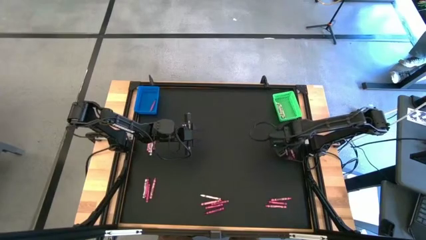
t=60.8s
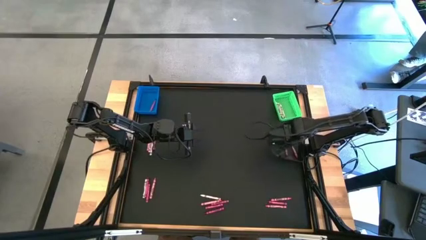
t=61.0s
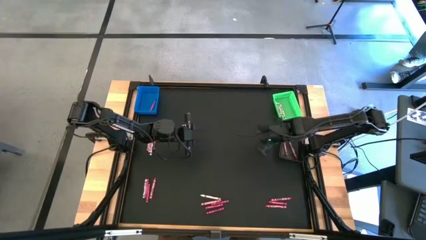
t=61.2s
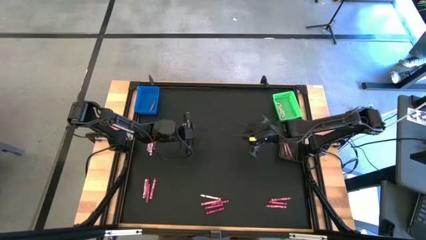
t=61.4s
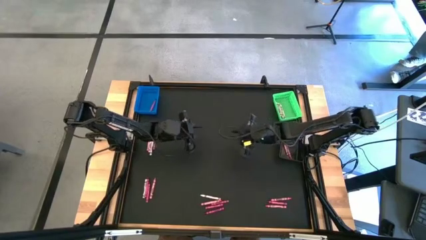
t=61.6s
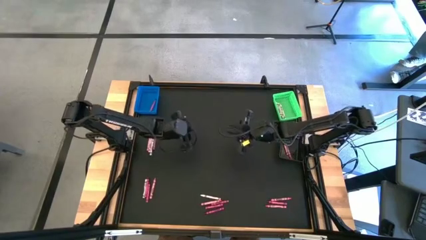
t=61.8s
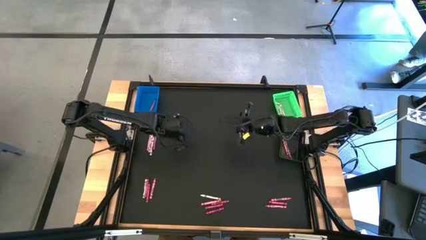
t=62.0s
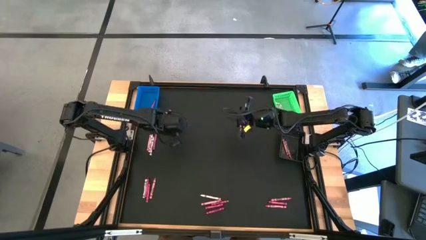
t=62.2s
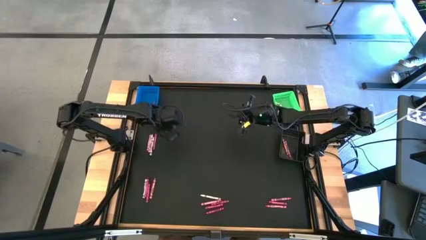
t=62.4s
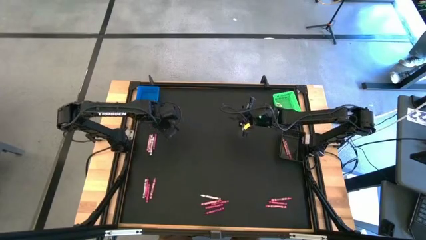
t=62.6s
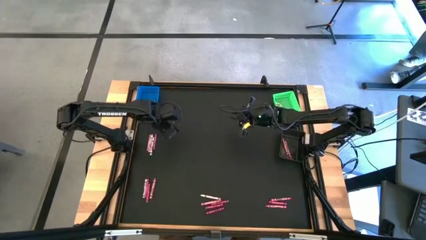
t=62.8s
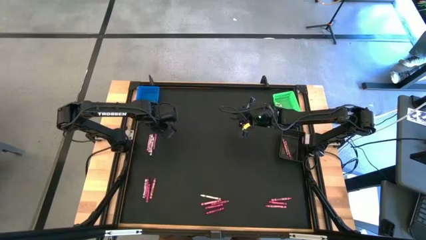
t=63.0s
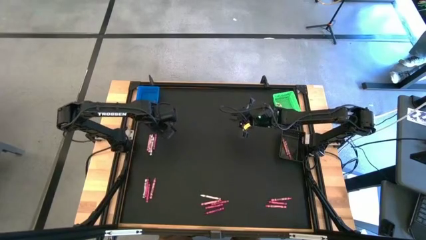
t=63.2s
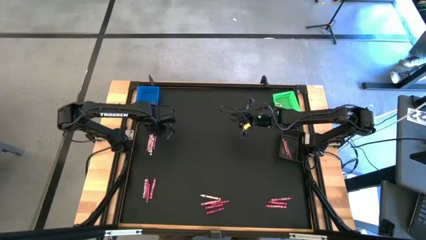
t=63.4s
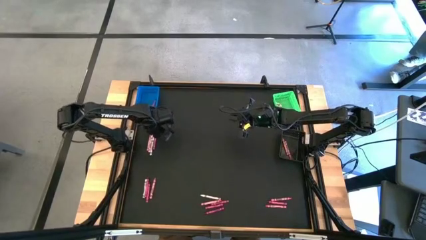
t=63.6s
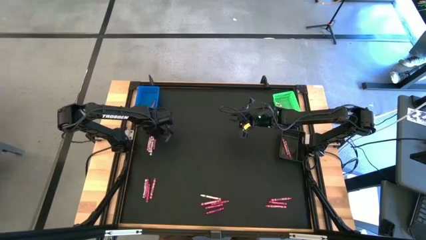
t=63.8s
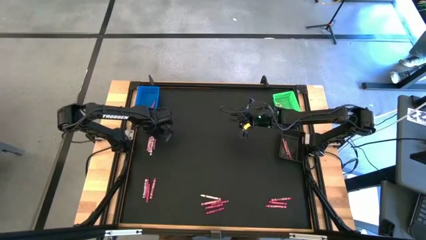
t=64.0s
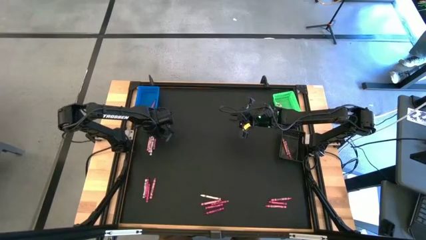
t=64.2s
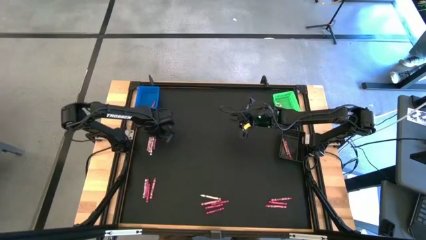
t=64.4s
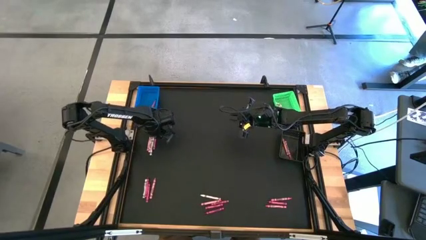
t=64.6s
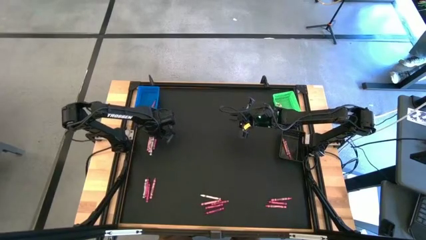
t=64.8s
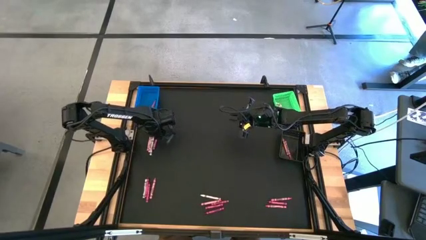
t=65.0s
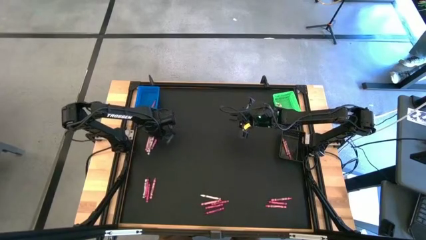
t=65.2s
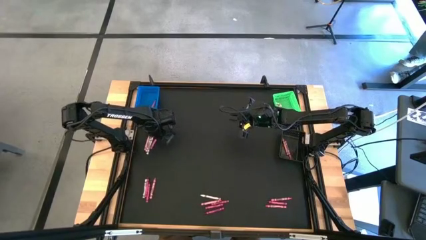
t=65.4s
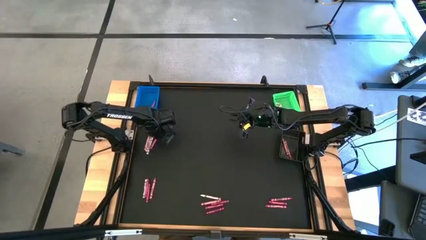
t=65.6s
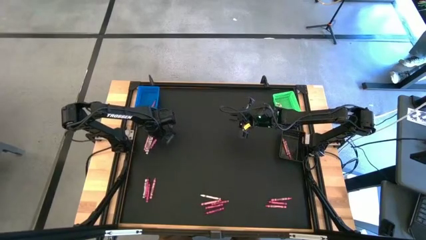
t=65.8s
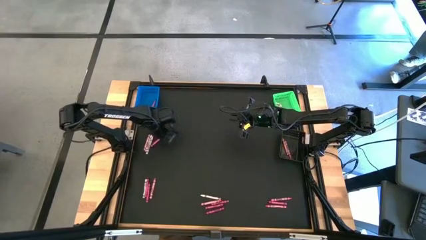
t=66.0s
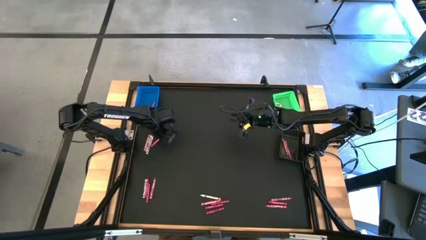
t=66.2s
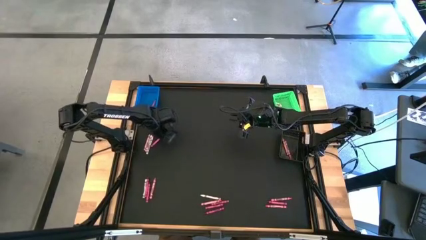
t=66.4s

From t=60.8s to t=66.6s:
Task: Sort crayons
Put the red crayon into the blue bin

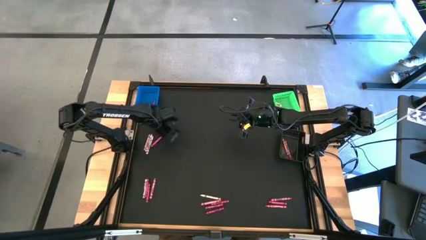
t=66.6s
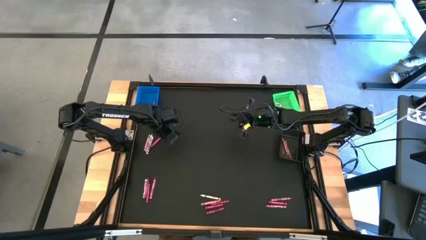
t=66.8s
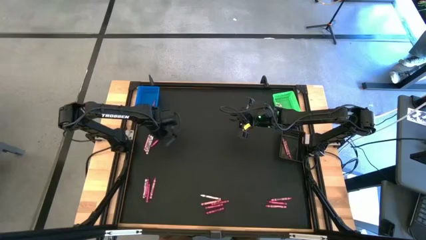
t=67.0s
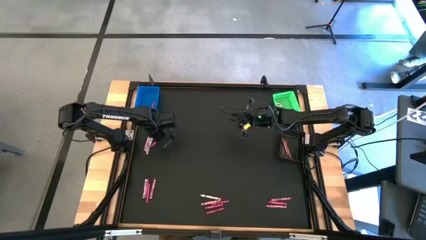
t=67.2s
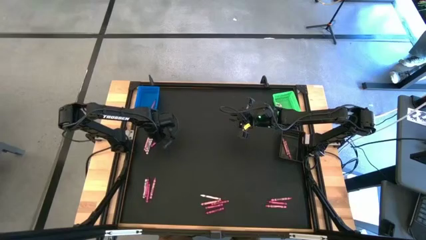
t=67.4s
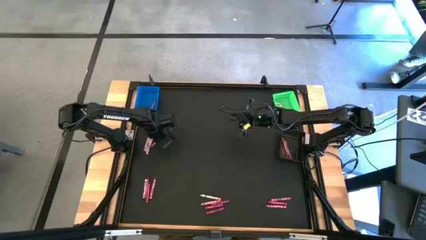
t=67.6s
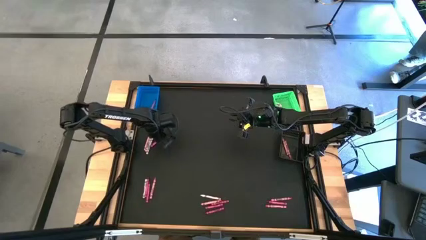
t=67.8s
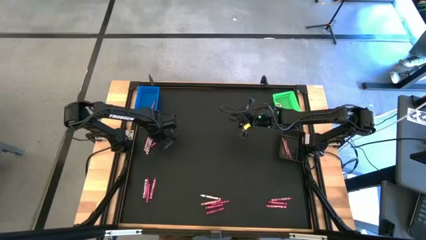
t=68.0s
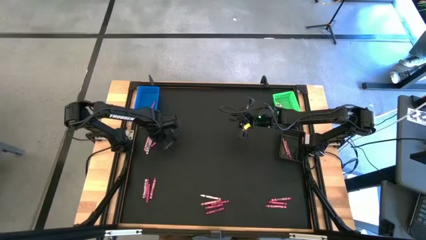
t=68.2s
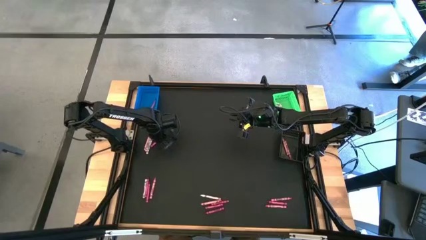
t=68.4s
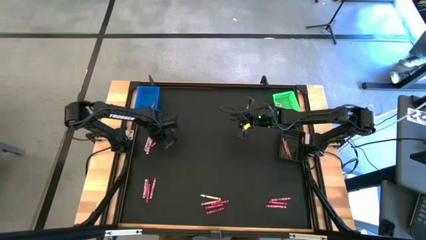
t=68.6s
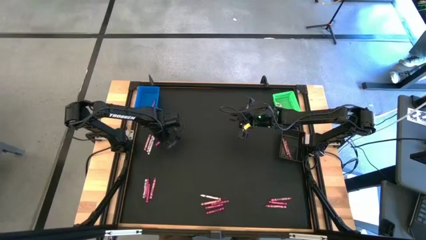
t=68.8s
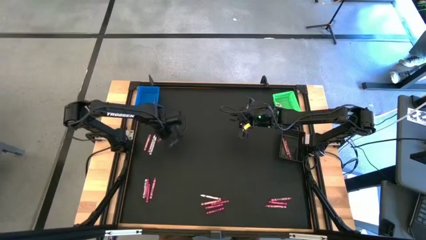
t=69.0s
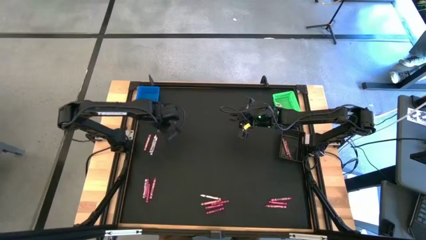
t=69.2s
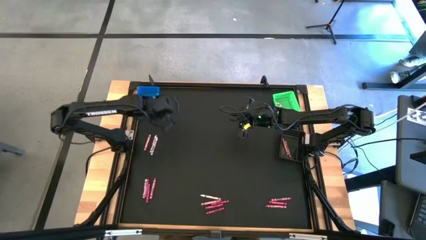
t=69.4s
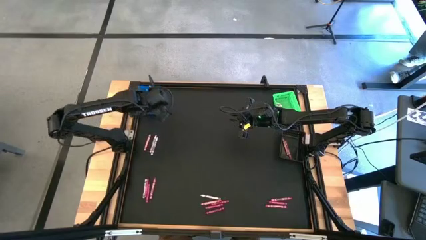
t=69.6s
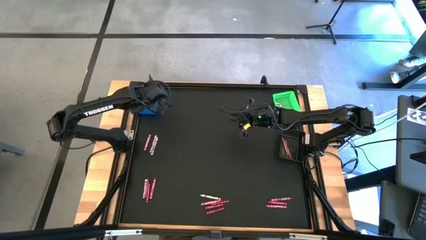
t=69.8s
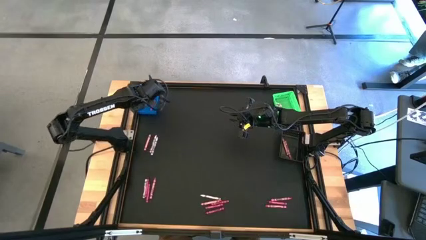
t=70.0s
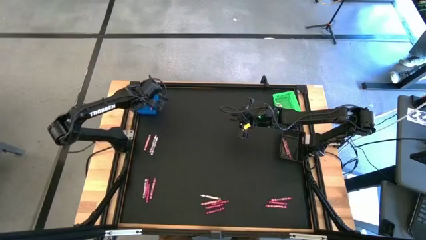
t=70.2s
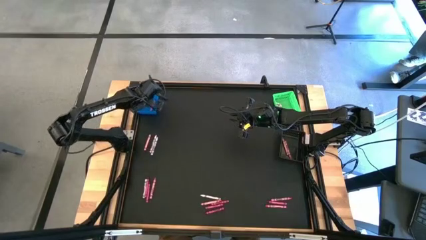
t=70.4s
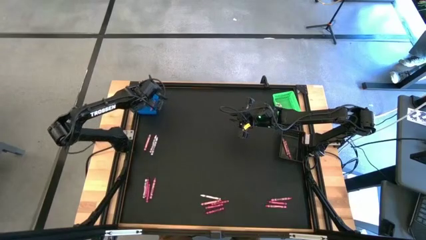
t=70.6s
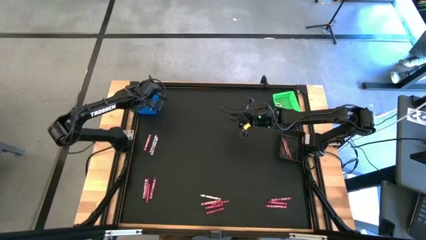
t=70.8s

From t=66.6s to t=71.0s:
Put the red crayon into the blue bin

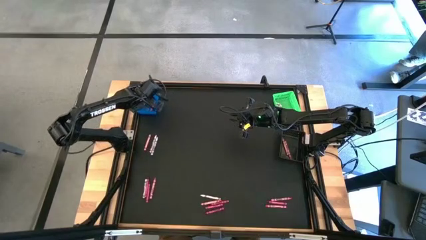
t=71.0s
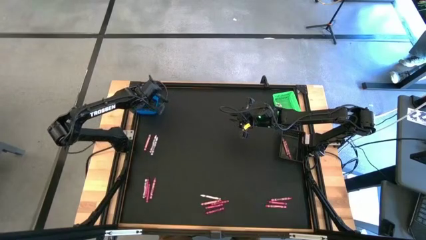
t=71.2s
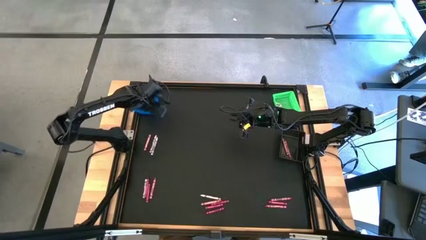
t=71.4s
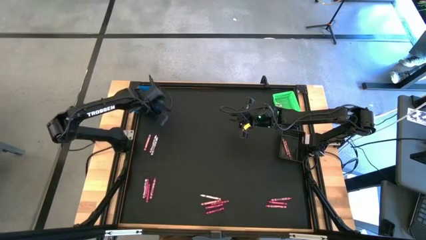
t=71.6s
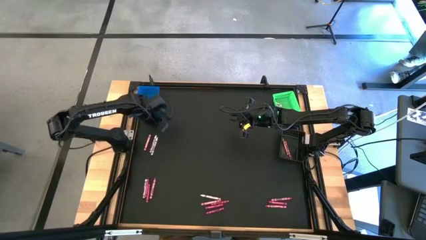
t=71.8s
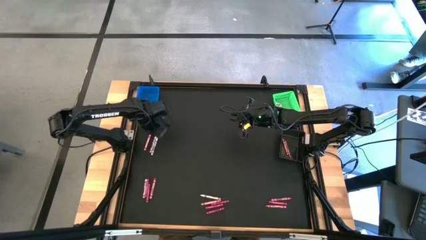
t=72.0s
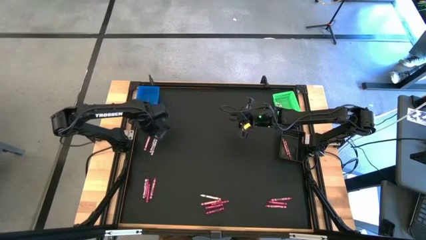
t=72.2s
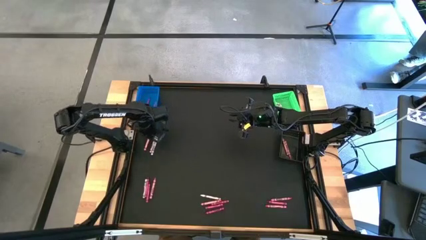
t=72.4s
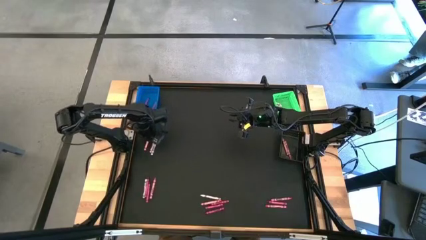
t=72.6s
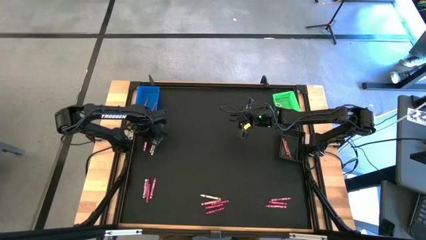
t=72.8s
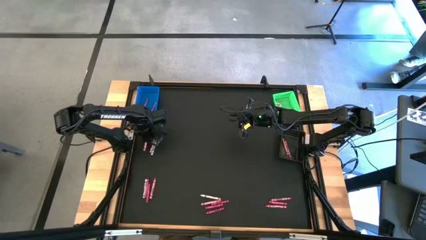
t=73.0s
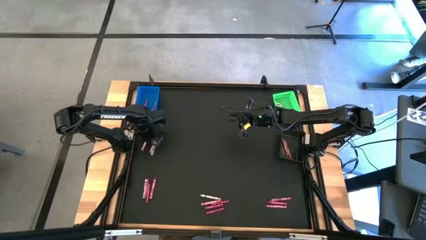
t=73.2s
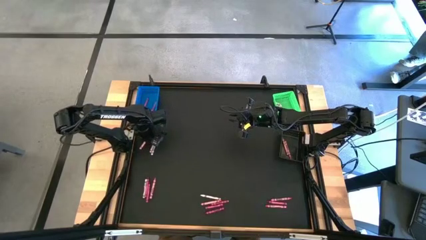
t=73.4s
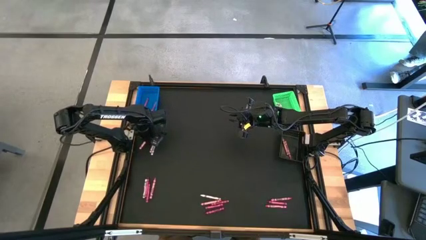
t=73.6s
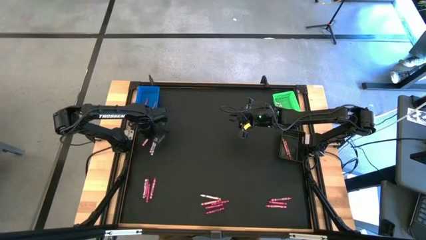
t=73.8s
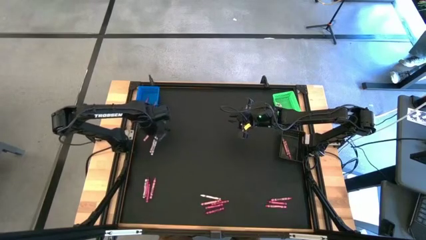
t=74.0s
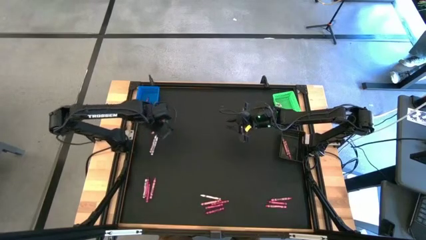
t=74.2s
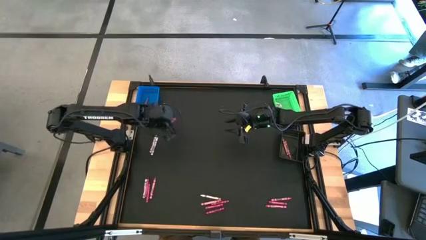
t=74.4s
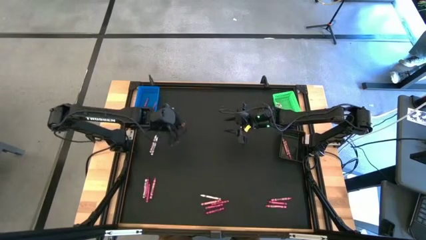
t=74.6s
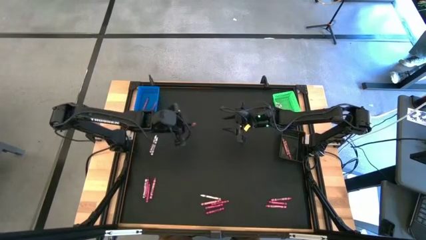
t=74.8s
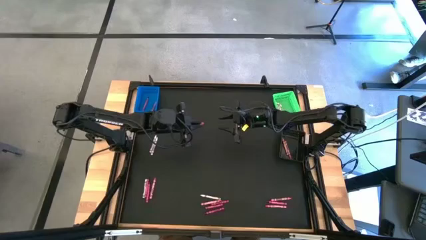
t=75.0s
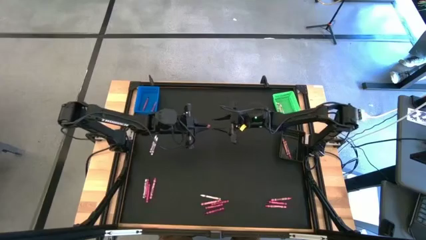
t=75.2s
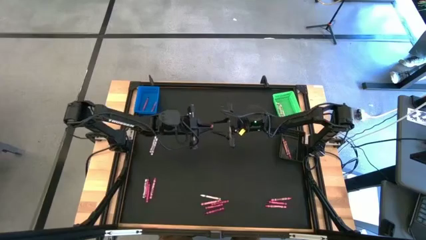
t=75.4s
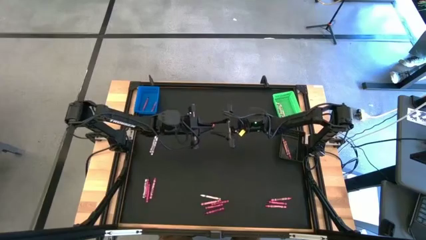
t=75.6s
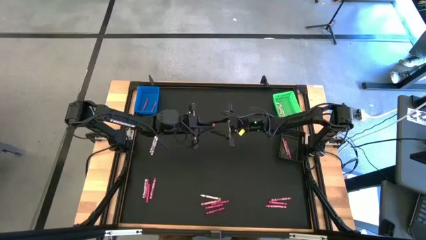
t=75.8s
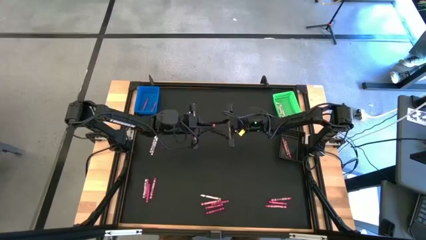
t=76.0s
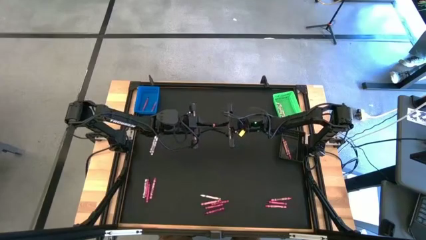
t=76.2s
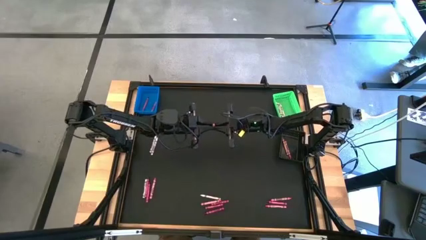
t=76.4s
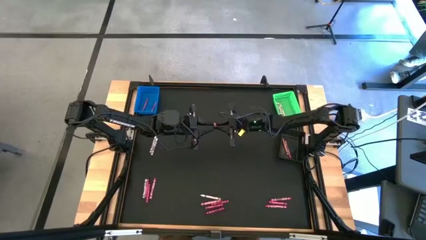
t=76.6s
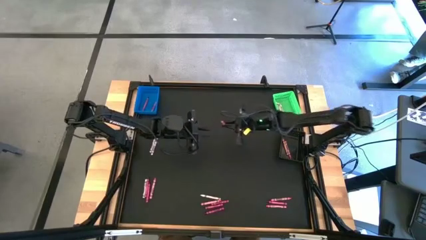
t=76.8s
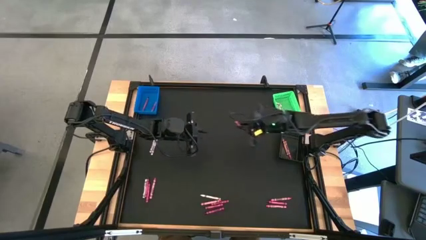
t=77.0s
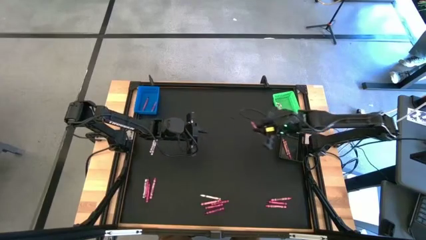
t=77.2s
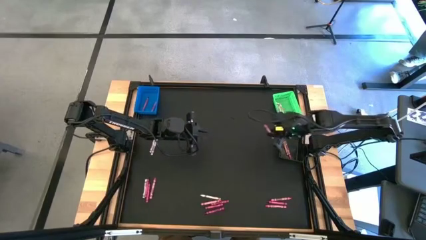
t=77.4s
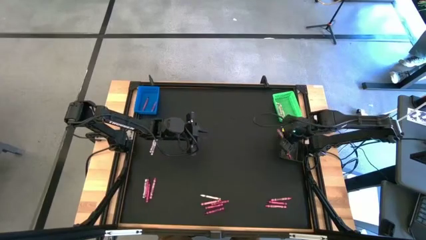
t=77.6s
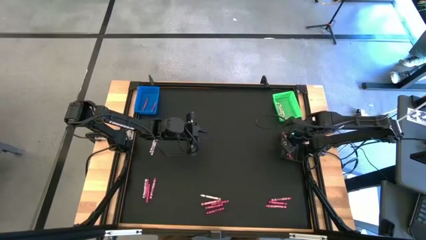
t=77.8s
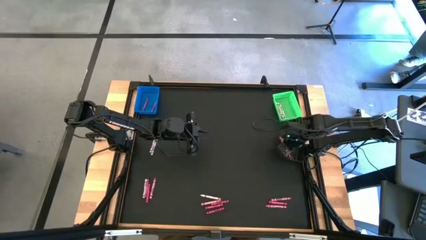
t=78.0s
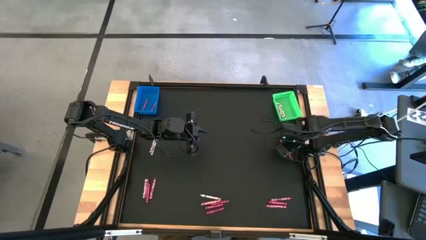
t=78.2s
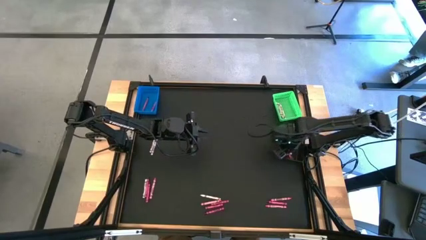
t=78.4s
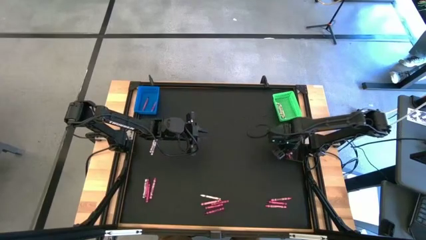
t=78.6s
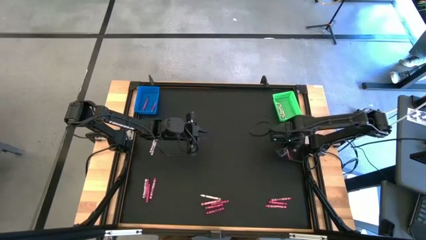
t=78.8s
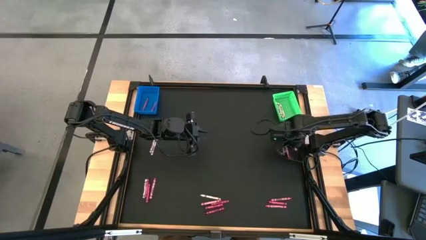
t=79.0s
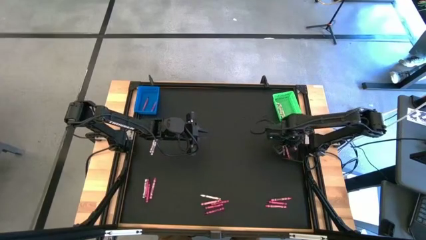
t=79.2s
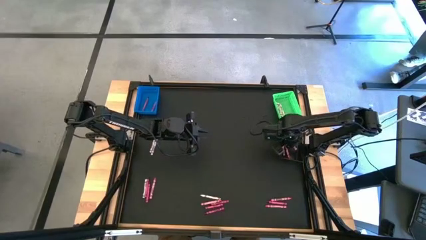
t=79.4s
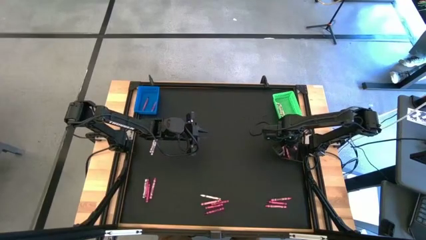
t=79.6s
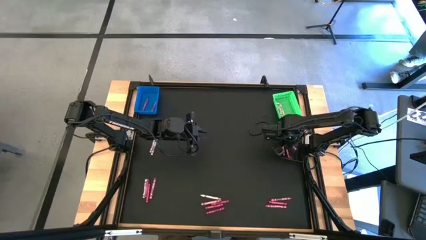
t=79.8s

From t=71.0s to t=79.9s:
Put the pink crayon into the black bin
